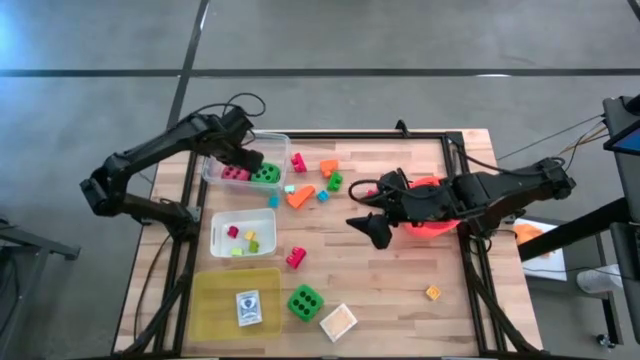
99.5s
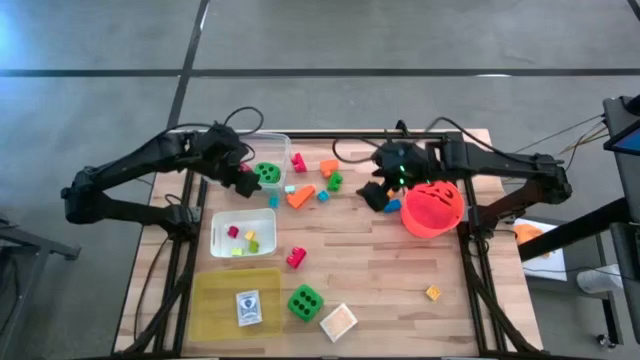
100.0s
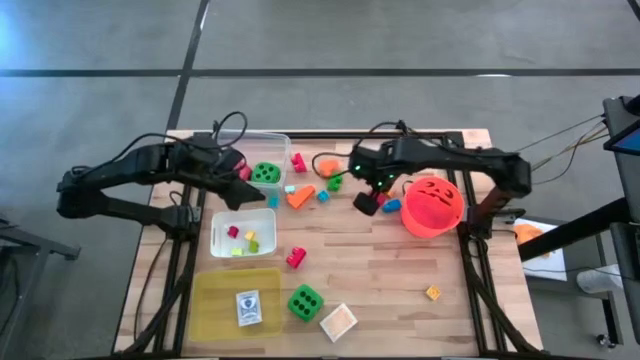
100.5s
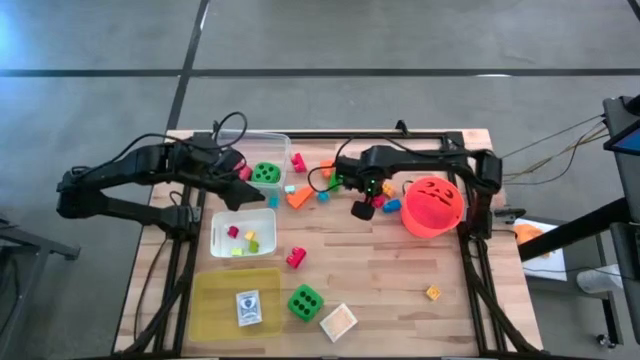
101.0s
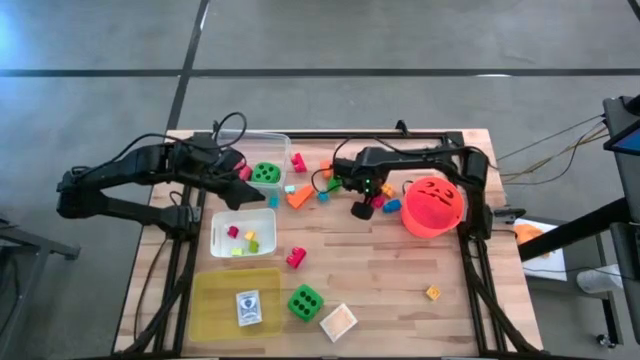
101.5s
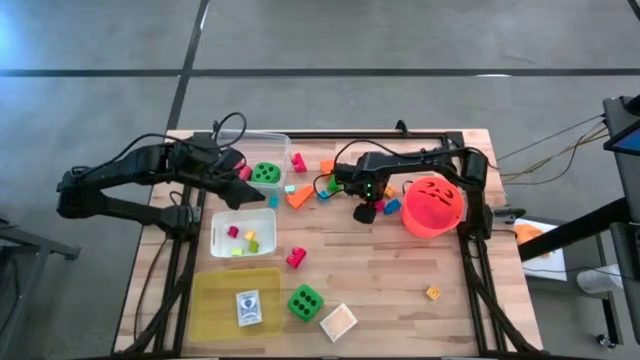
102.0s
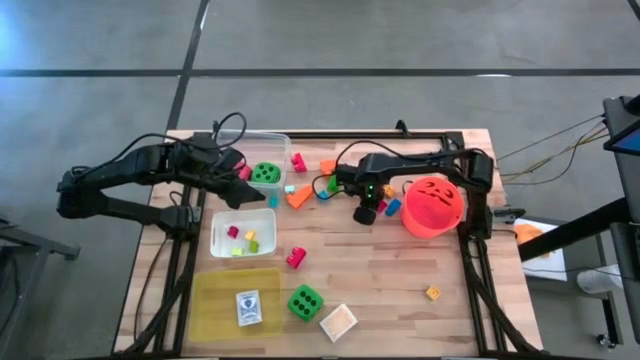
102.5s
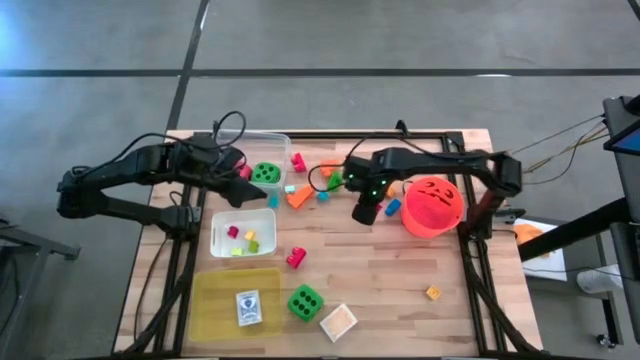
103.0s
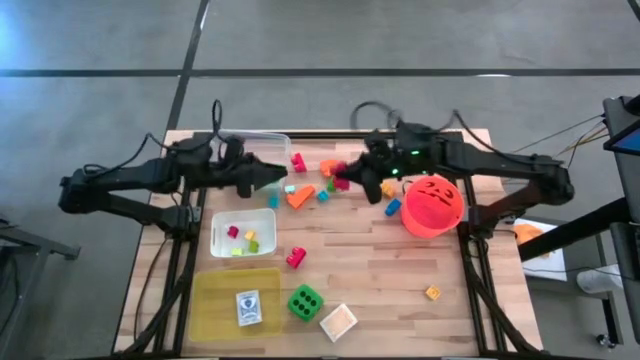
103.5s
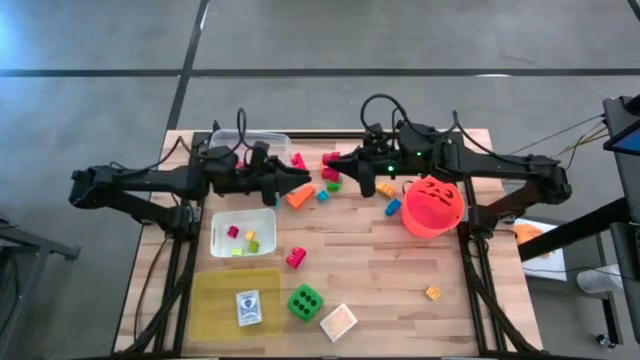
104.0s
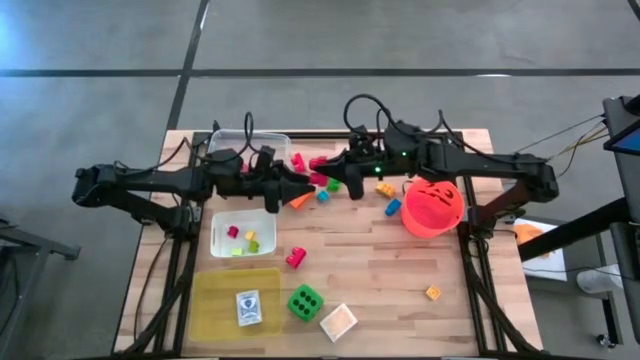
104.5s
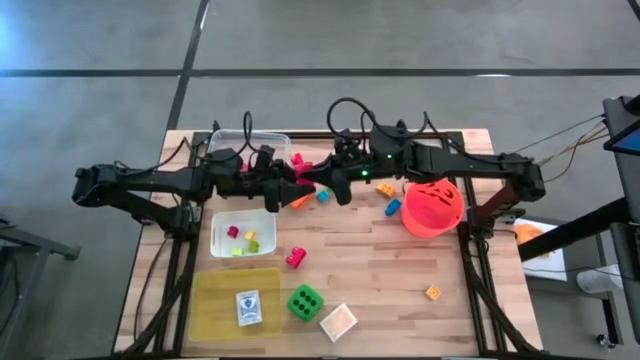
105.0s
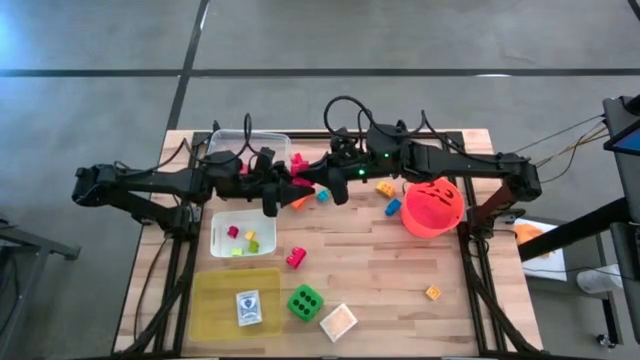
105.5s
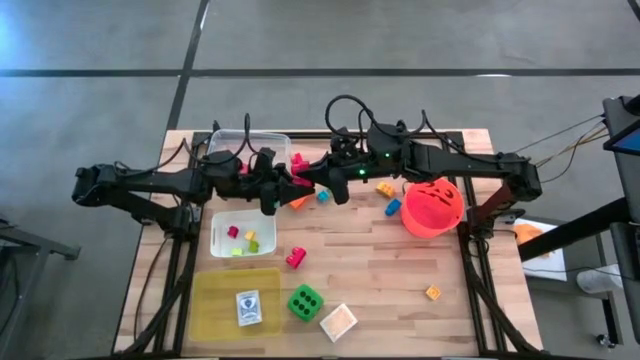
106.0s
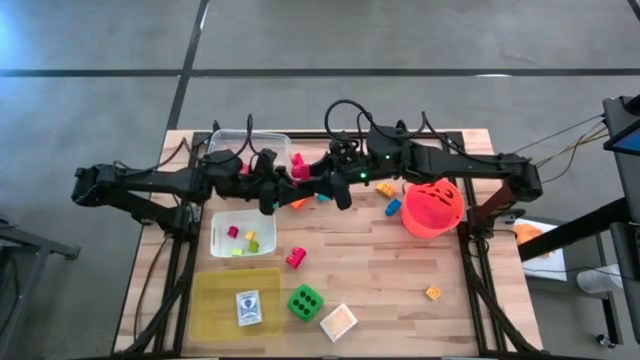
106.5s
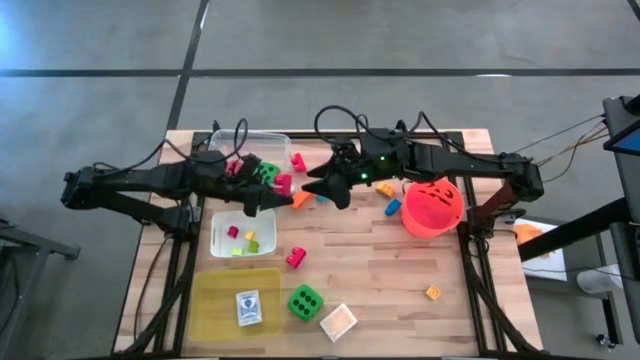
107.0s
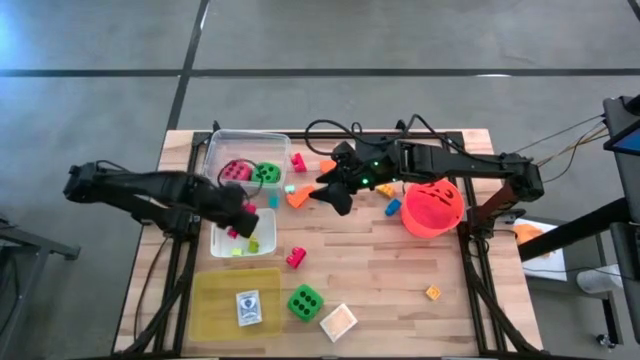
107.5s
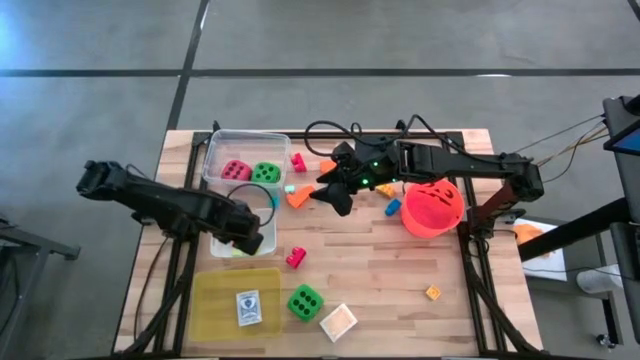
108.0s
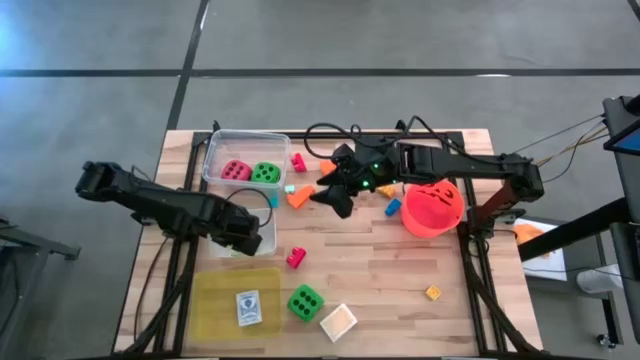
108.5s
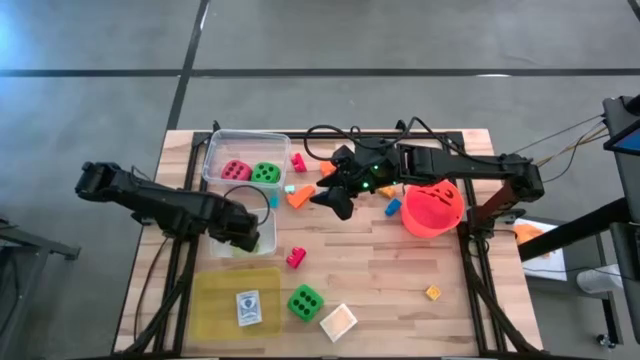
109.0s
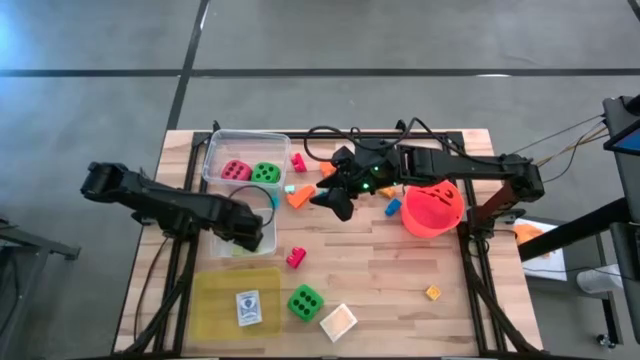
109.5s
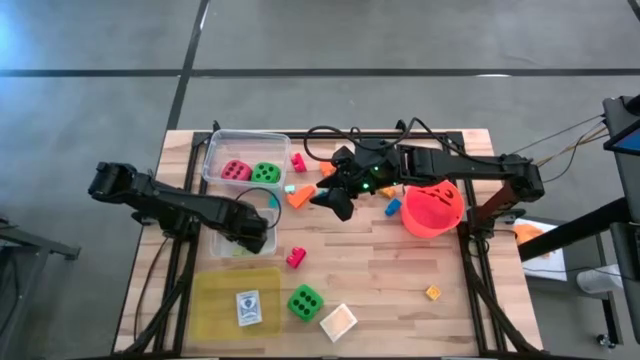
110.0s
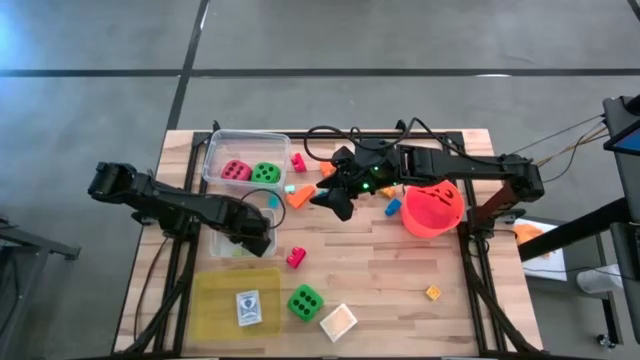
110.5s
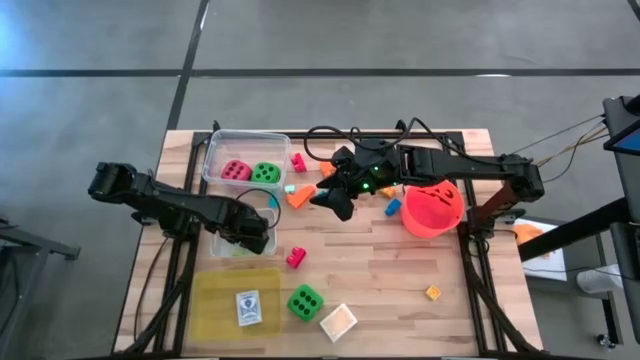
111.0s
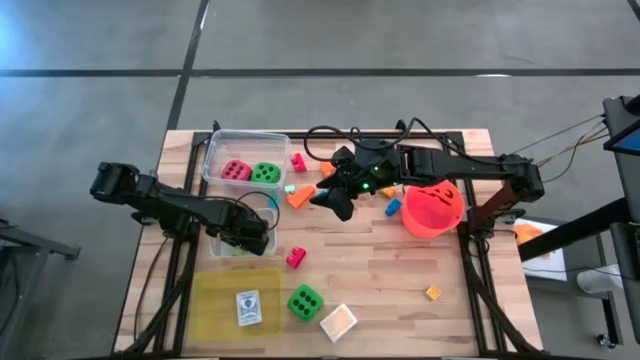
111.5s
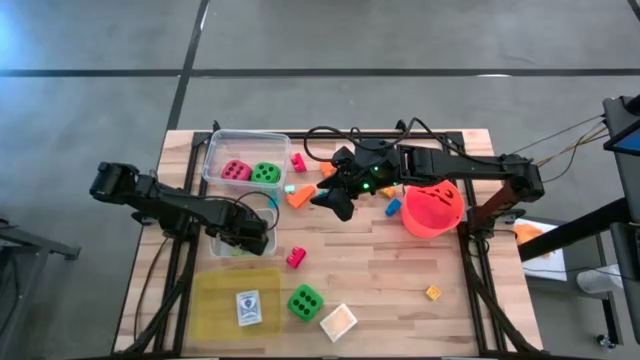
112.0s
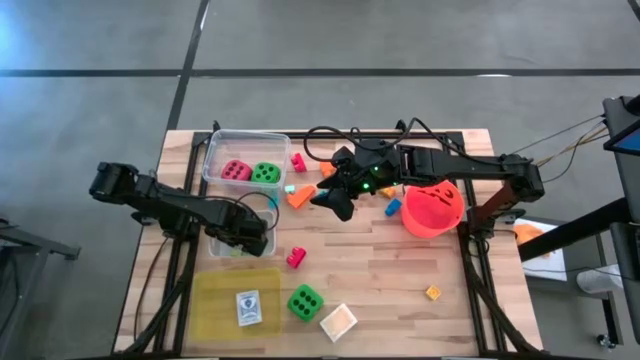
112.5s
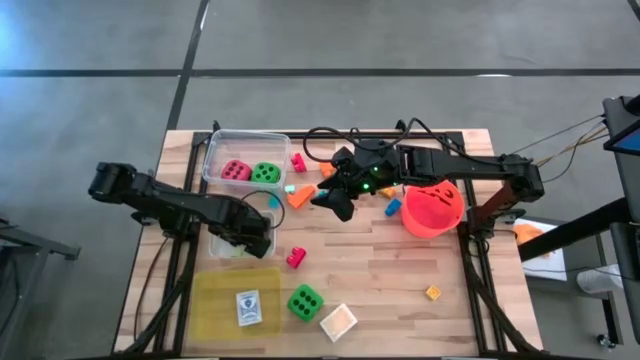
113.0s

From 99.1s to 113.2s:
Task: Pick & Place Toys
Put the red game piece into the white bin

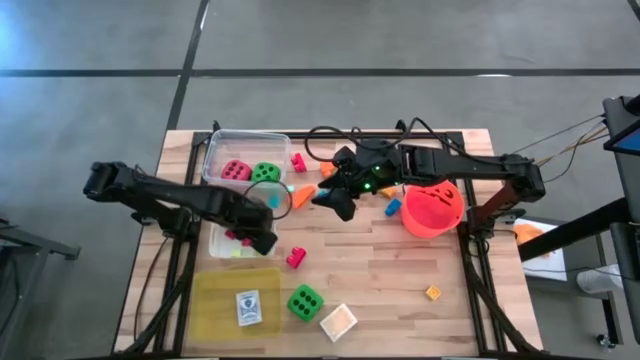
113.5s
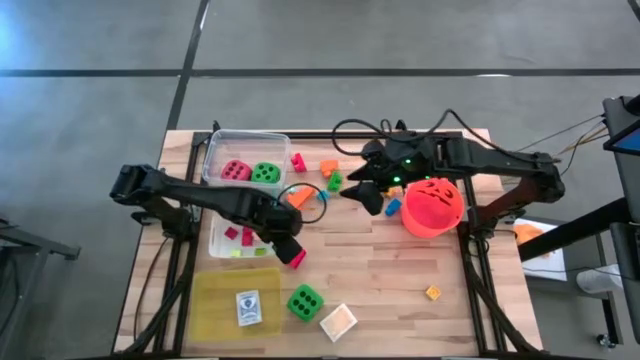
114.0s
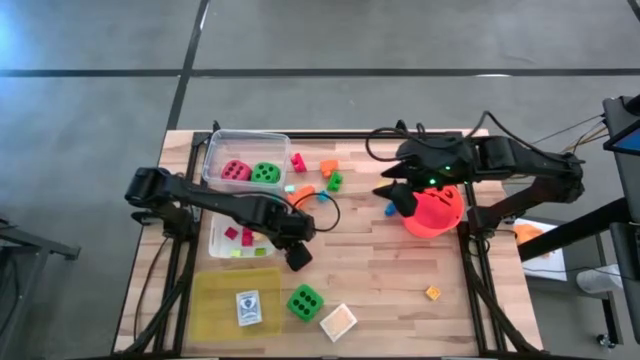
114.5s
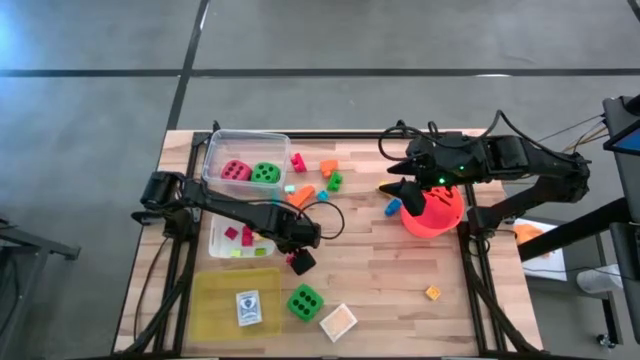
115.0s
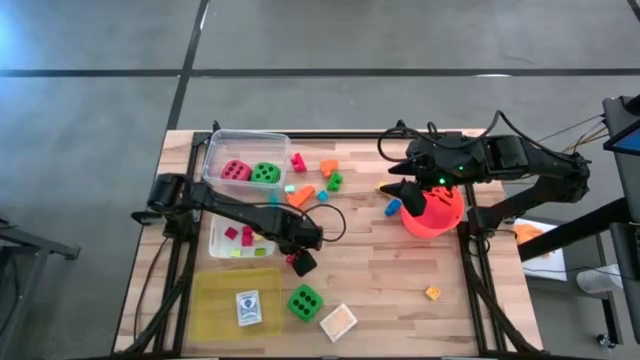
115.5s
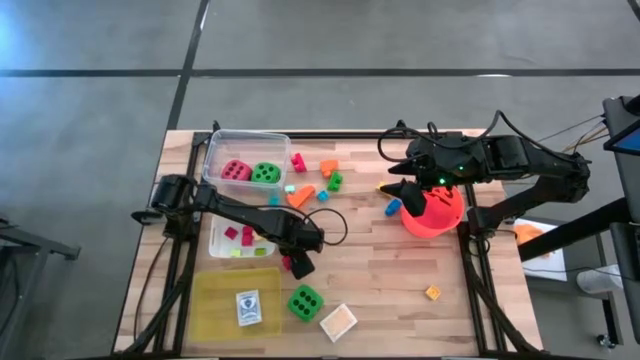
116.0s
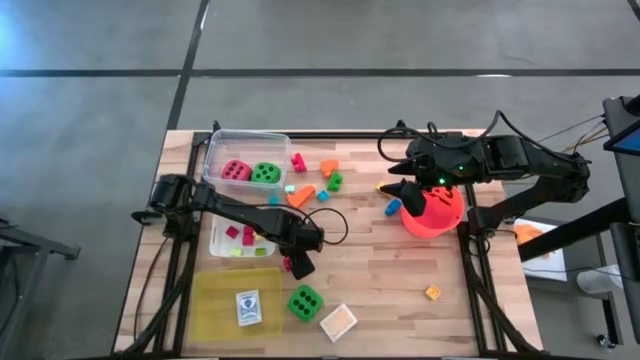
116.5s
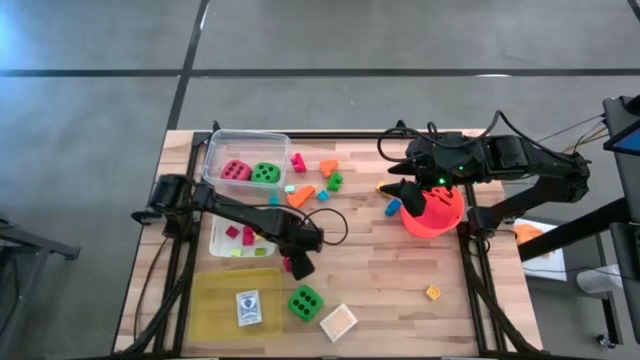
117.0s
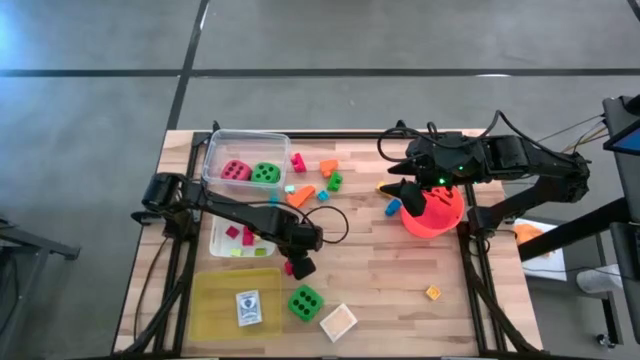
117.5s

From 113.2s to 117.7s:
Put the red game piece into the white bin

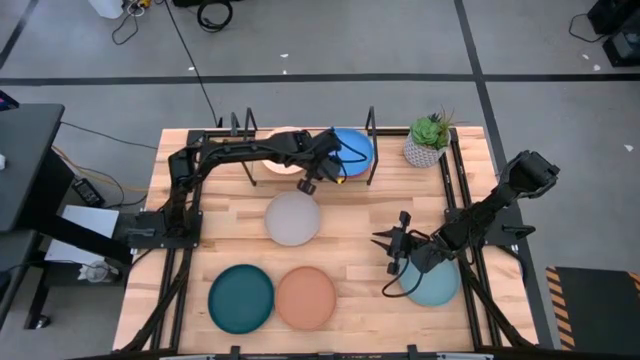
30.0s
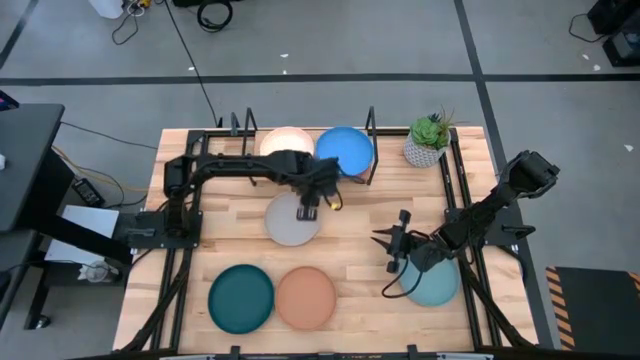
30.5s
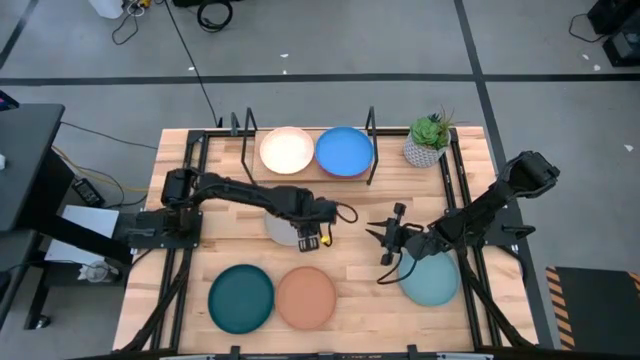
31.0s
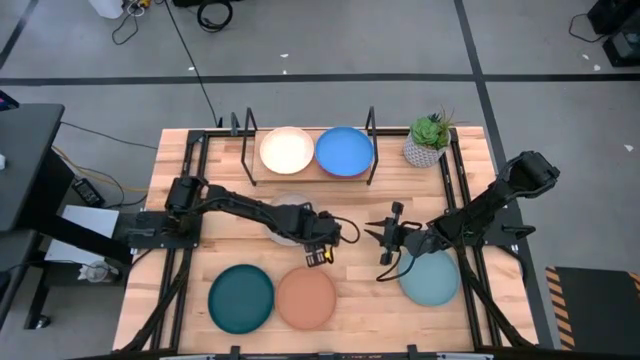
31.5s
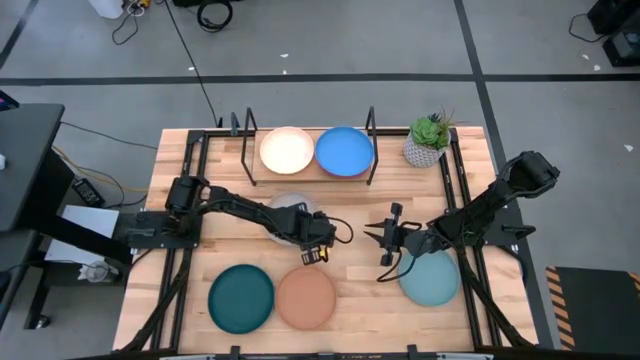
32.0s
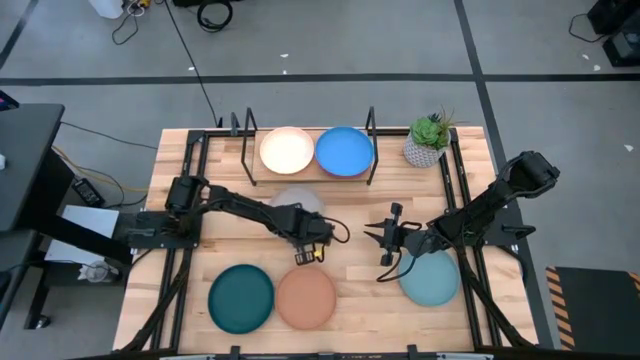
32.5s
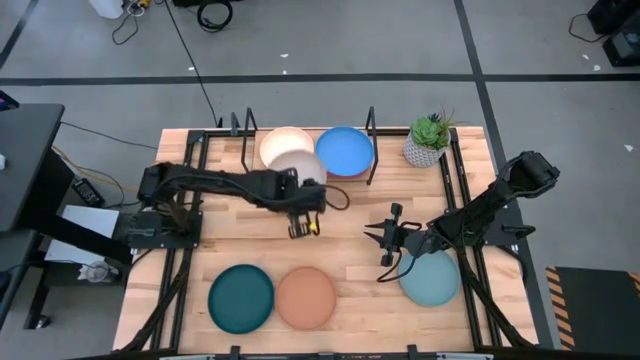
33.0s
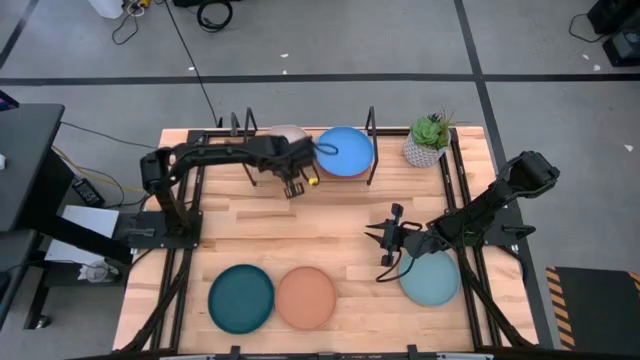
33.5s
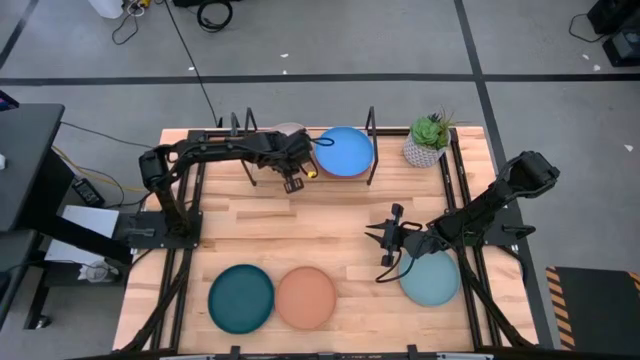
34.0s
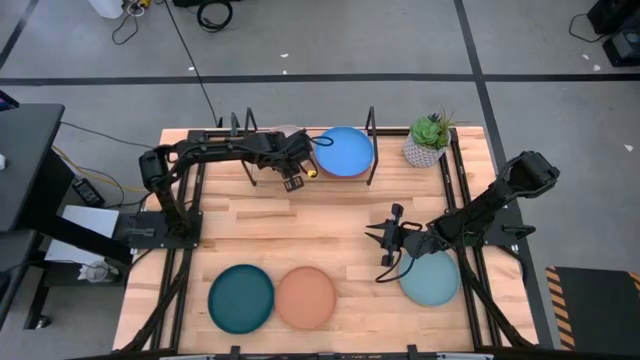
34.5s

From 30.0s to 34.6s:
Task: Place and stack plates onto a shelf
Stack the gray plate on top of the white plate on the shelf
